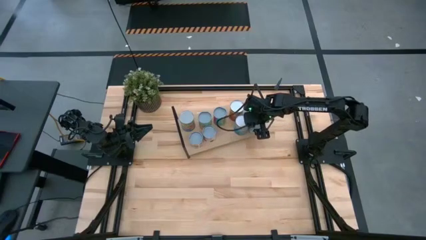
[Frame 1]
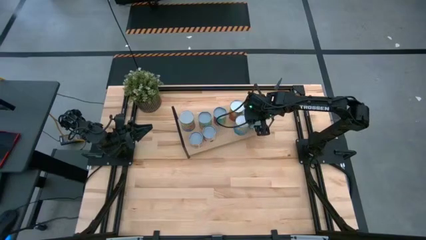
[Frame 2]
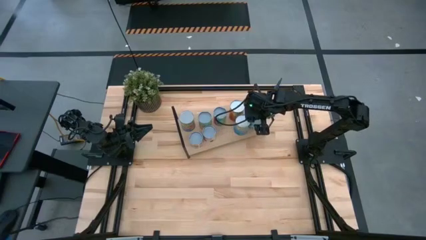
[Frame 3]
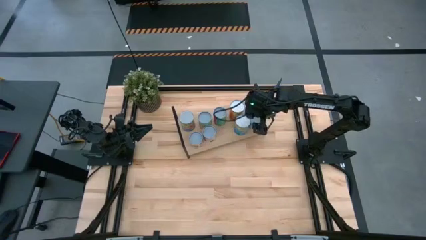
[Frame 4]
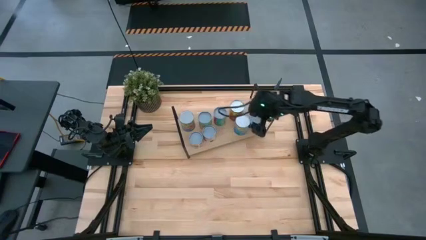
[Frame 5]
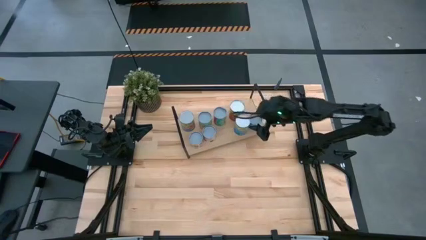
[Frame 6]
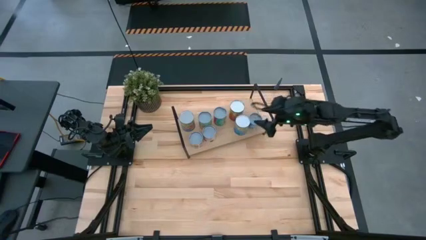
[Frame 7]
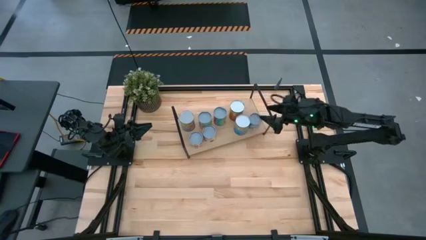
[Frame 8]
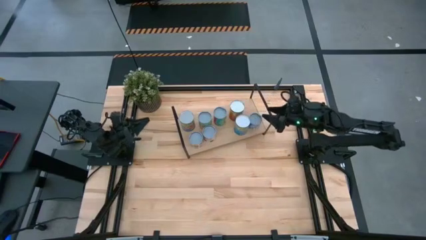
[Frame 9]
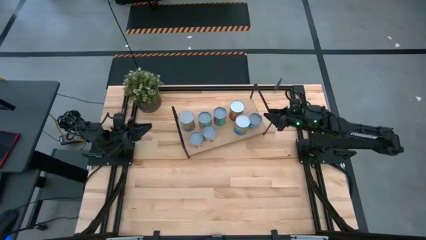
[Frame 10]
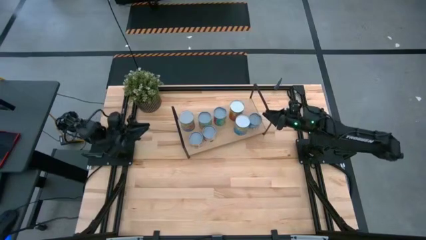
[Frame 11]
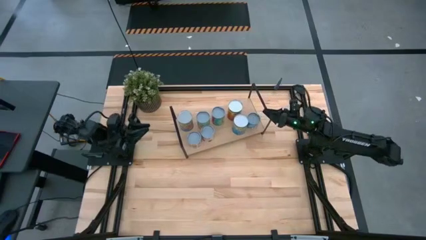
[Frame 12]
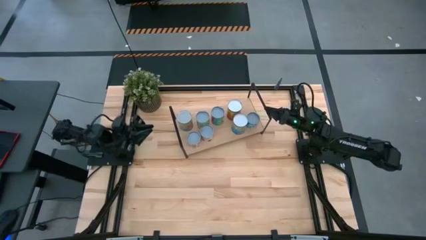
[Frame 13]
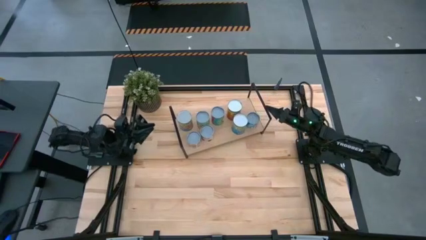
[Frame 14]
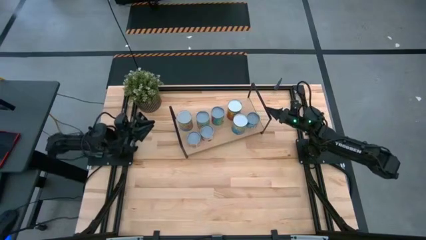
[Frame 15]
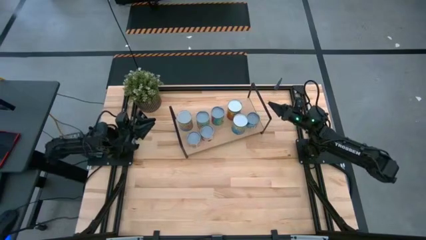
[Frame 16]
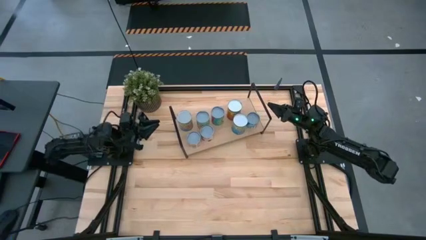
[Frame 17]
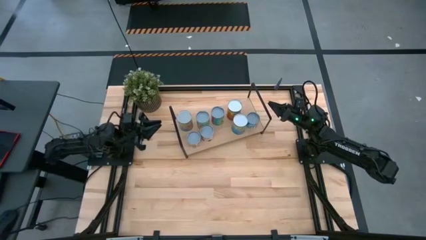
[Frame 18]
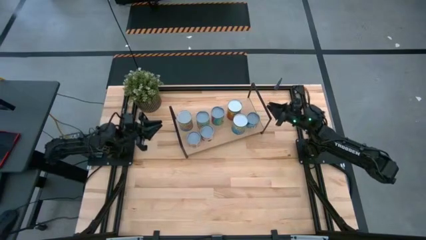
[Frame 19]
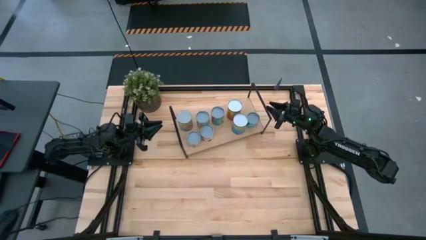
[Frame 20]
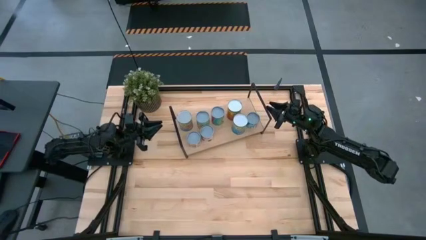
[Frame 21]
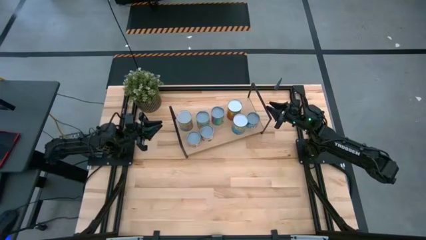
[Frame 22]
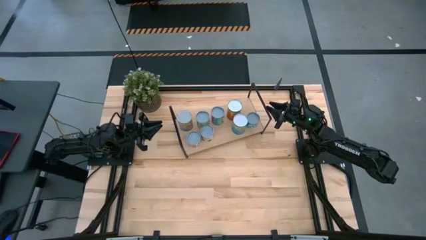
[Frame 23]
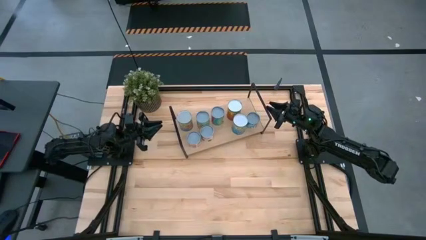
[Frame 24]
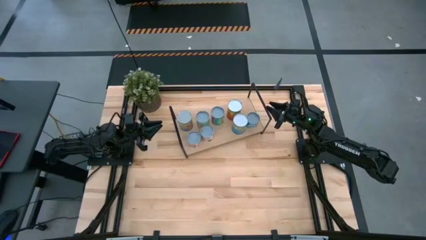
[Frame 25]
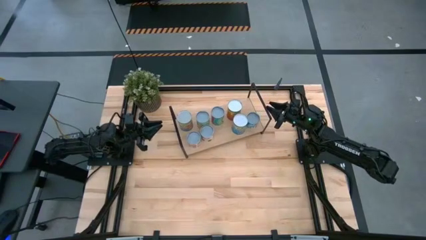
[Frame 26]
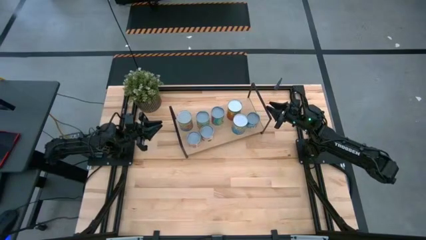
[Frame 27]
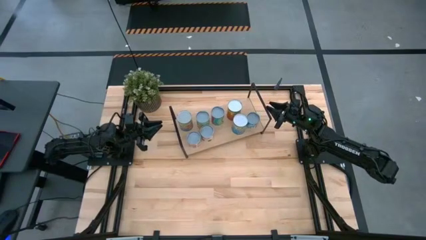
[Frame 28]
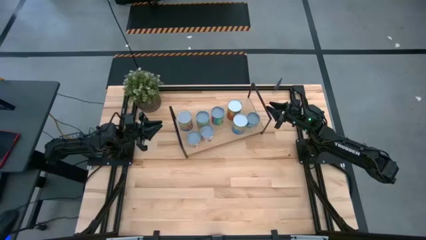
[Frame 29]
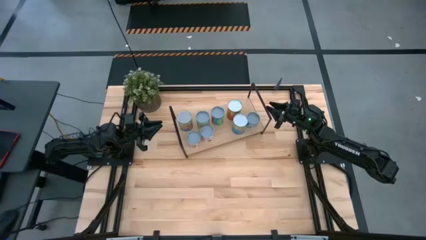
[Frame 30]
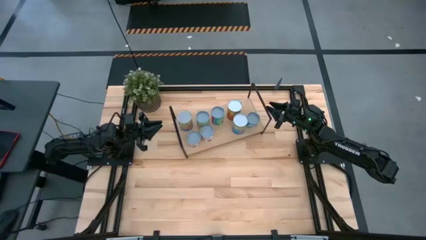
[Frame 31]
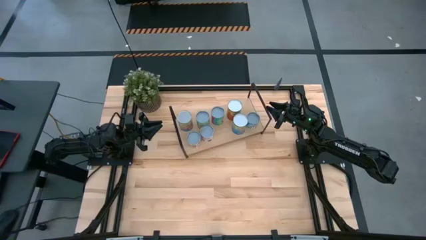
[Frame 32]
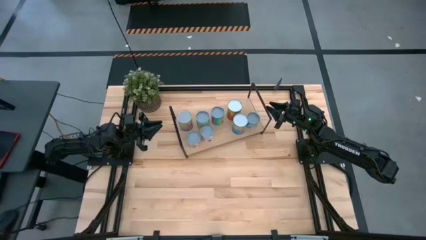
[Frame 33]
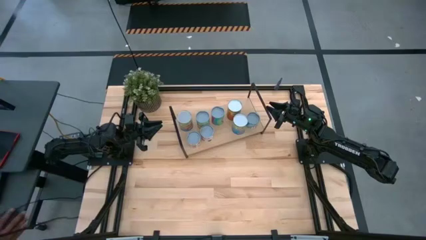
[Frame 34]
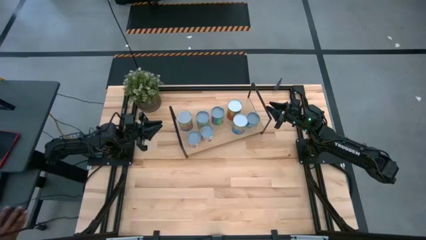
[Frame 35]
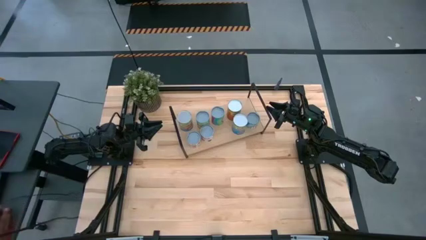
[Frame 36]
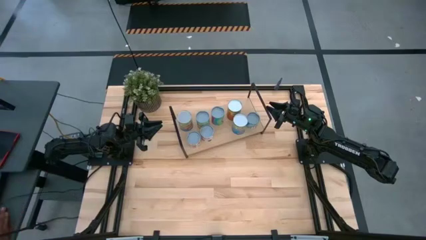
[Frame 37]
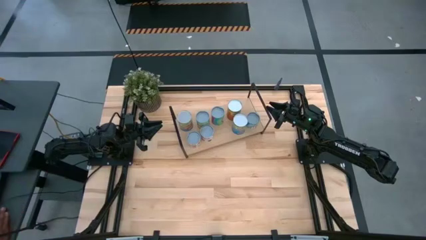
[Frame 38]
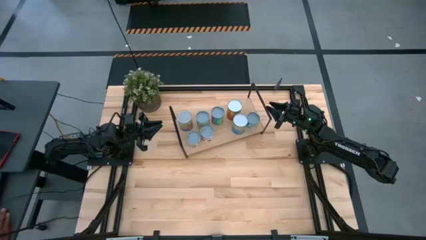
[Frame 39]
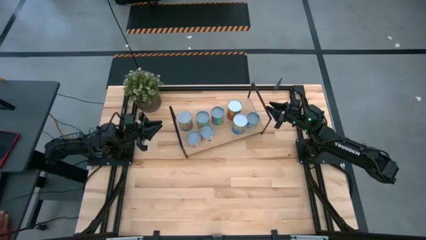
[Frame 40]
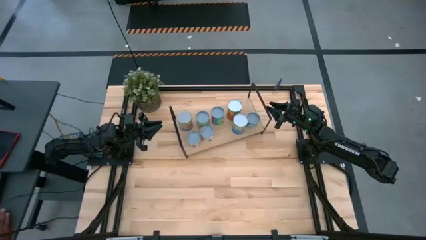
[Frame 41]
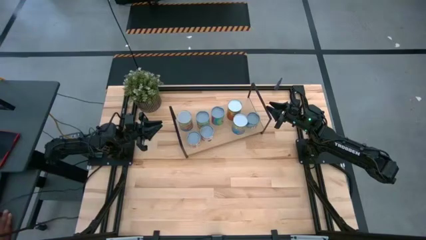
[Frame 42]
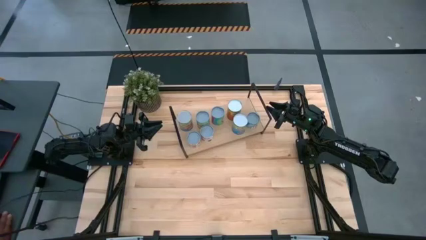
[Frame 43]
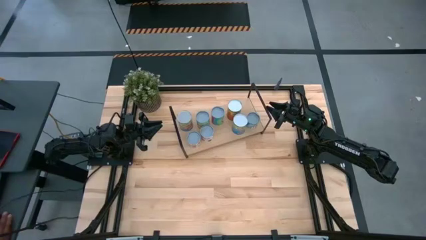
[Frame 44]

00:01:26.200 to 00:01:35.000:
Task: Pick and place cans onto a shelf
Return to Home Position
